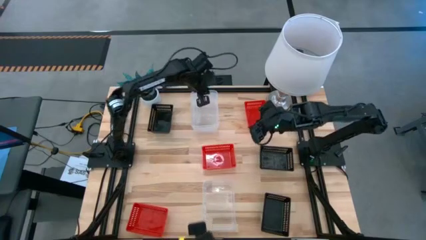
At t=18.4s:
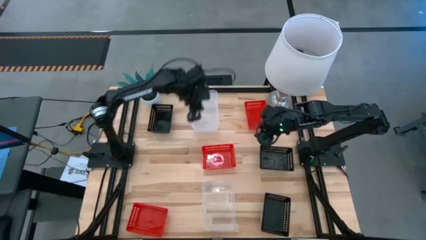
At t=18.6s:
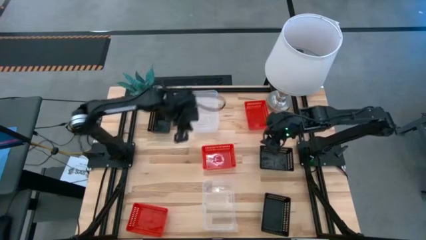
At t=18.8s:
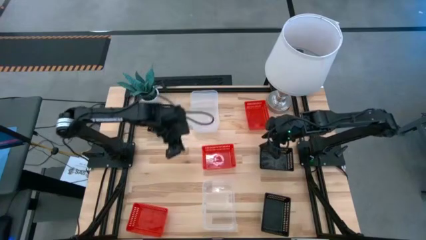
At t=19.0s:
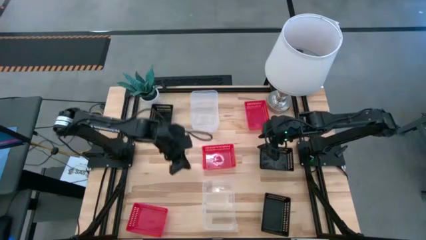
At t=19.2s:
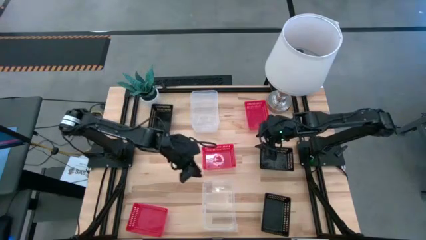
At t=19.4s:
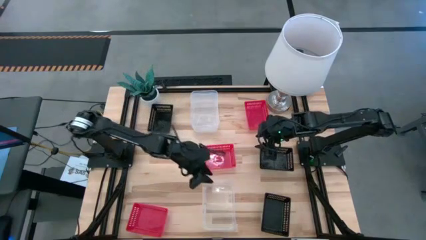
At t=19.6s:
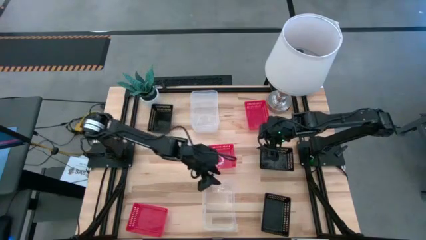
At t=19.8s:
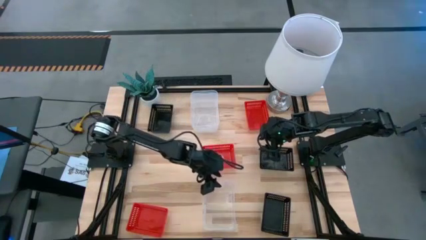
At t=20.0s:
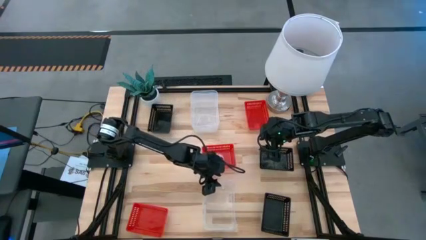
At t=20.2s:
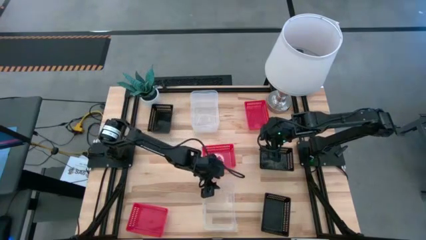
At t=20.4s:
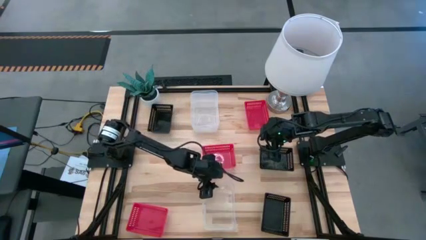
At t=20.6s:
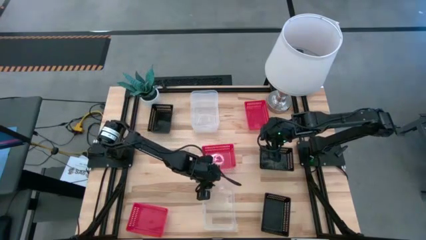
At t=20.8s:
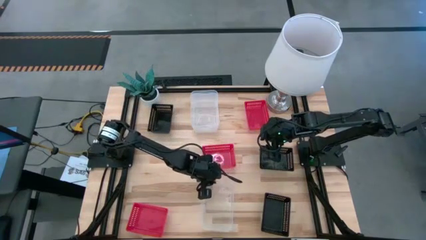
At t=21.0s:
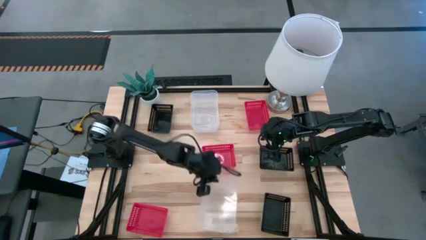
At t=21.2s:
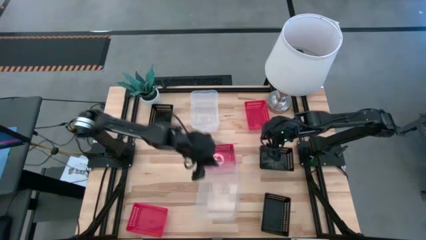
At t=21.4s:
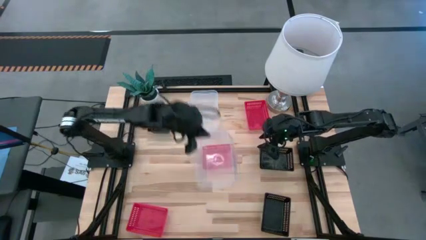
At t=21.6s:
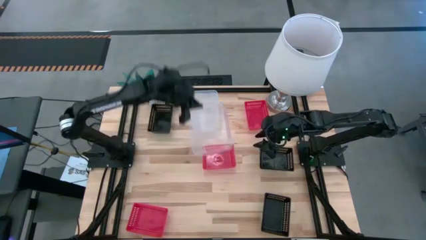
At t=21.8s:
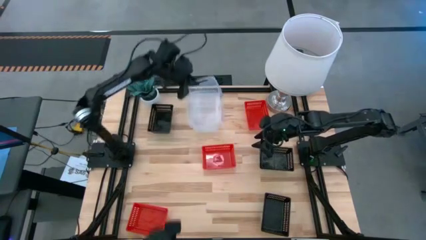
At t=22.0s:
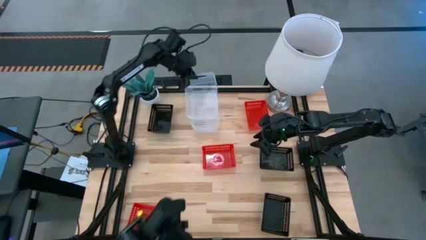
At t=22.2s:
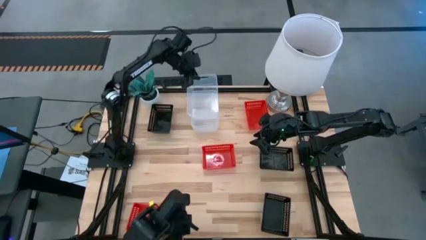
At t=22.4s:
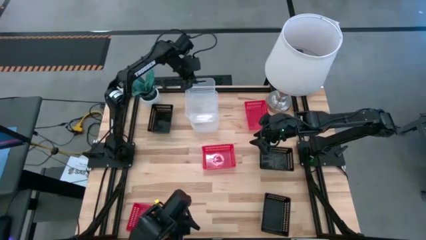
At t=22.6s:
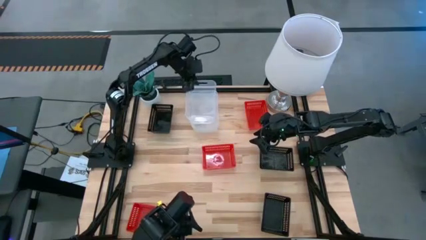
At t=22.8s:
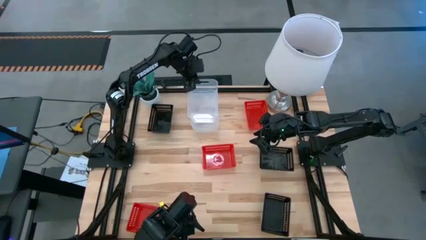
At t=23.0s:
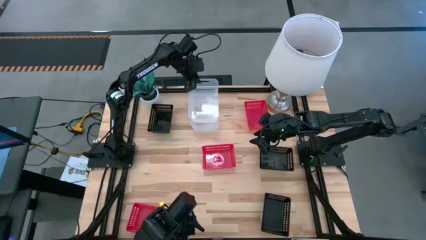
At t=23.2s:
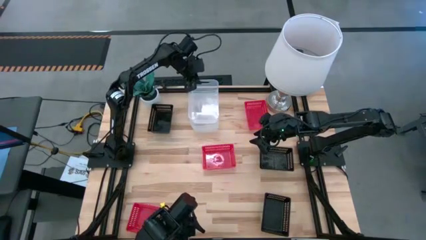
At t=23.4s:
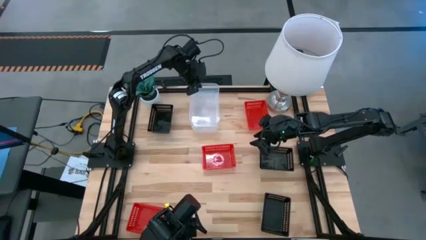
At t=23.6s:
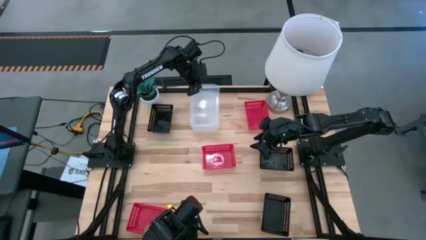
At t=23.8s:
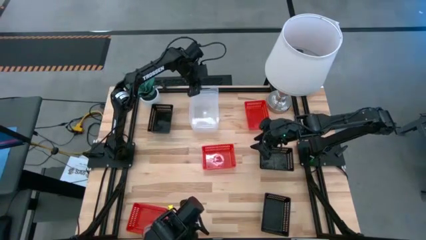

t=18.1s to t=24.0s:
Stack the transparent bin on the stacked transparent bins

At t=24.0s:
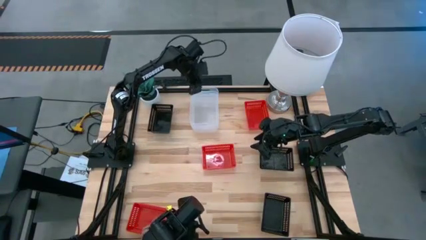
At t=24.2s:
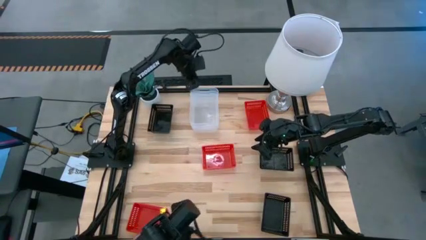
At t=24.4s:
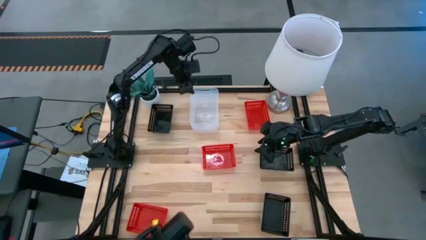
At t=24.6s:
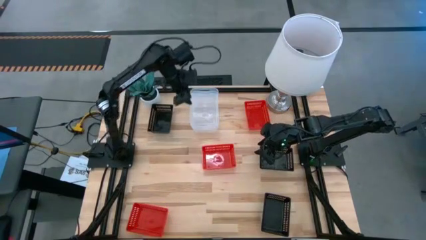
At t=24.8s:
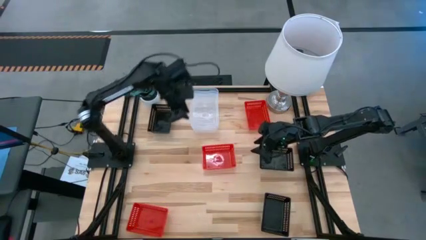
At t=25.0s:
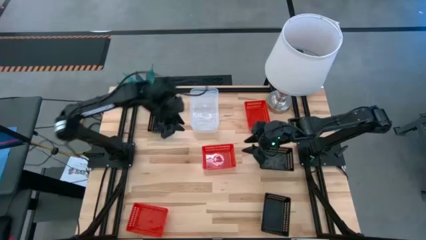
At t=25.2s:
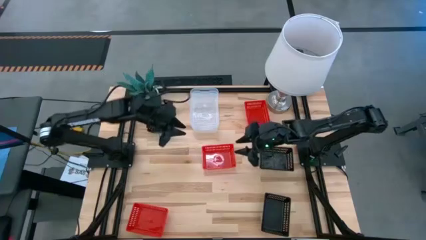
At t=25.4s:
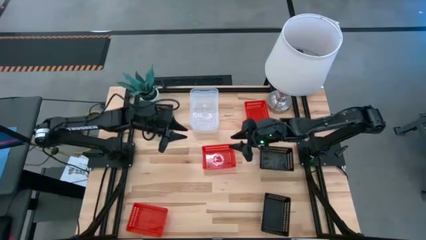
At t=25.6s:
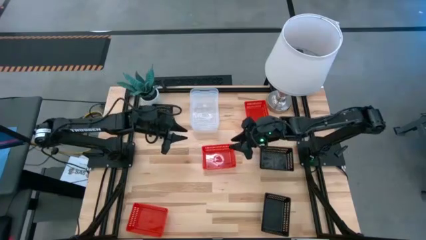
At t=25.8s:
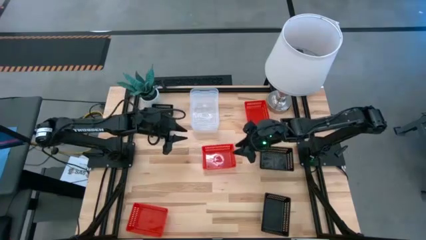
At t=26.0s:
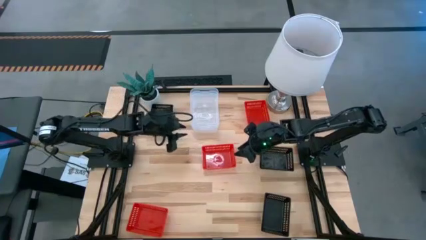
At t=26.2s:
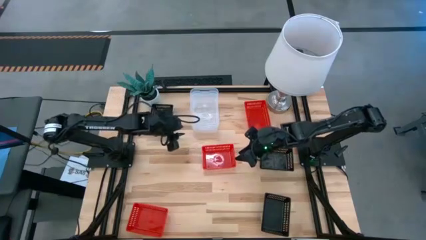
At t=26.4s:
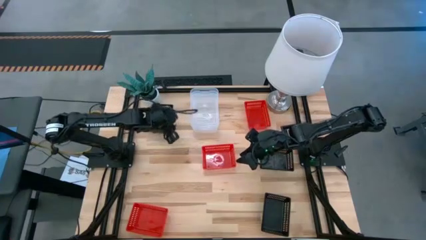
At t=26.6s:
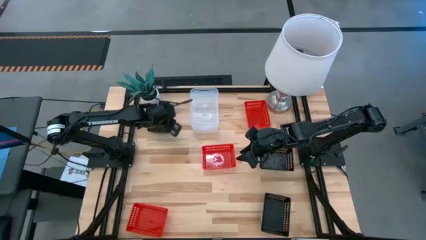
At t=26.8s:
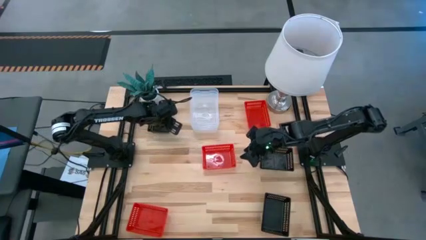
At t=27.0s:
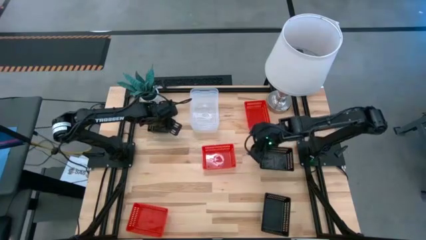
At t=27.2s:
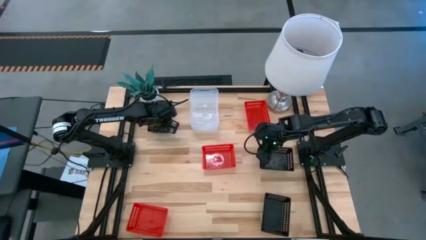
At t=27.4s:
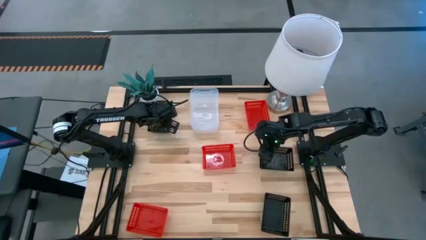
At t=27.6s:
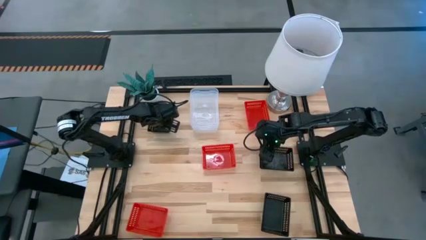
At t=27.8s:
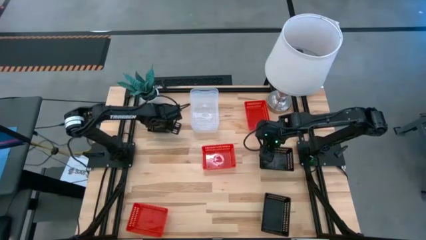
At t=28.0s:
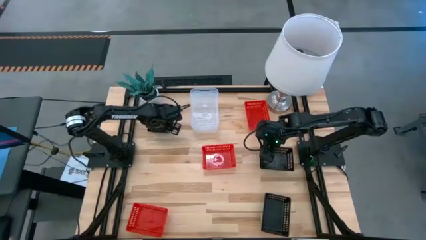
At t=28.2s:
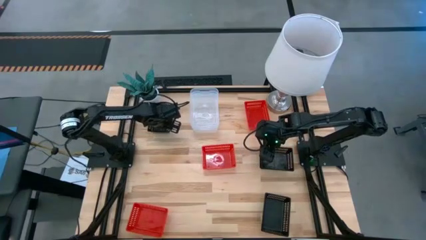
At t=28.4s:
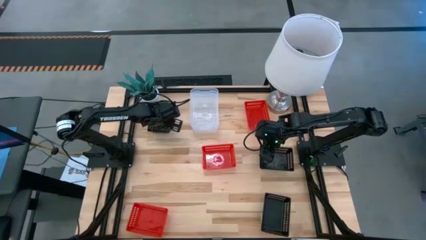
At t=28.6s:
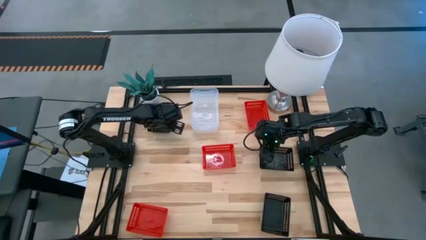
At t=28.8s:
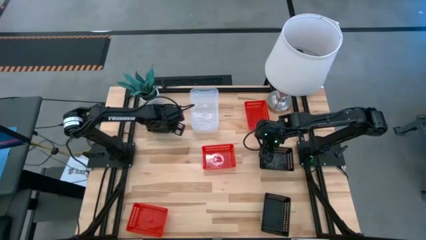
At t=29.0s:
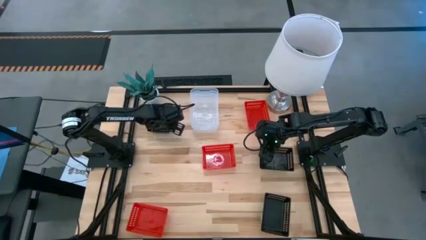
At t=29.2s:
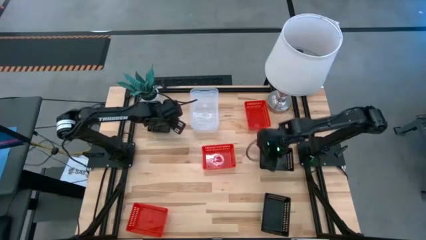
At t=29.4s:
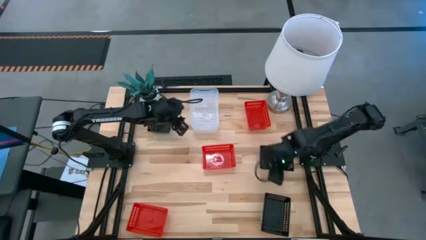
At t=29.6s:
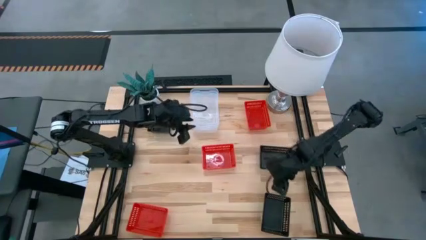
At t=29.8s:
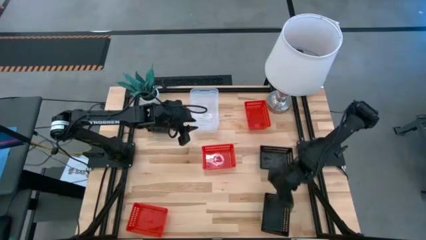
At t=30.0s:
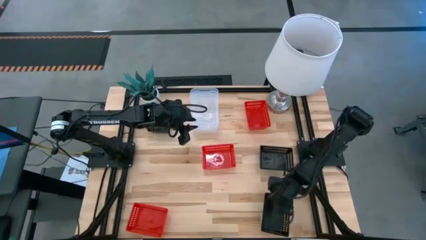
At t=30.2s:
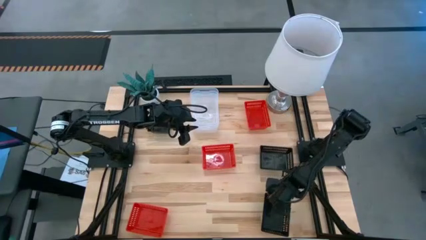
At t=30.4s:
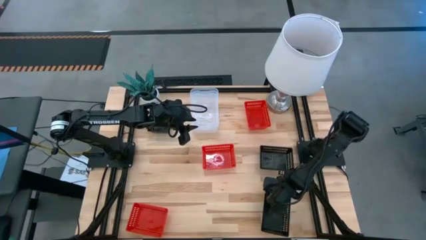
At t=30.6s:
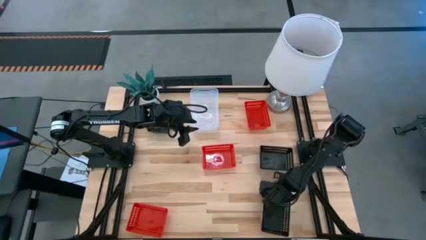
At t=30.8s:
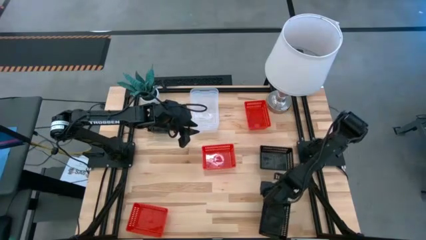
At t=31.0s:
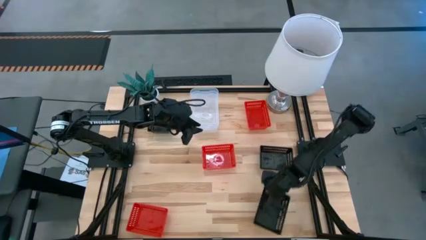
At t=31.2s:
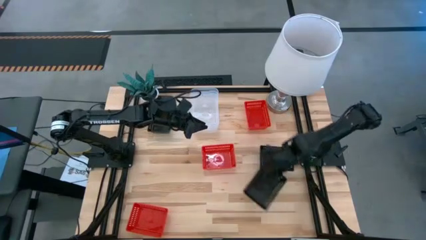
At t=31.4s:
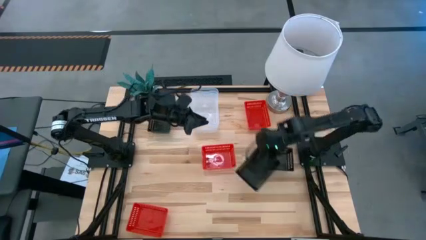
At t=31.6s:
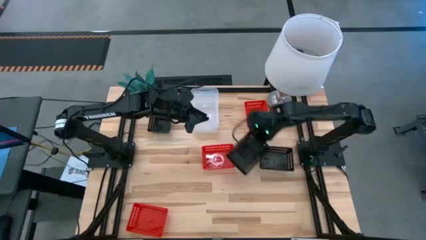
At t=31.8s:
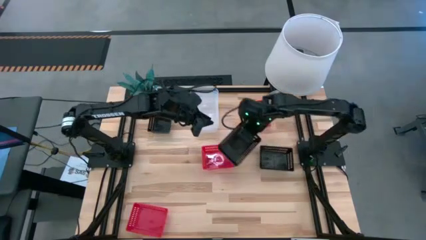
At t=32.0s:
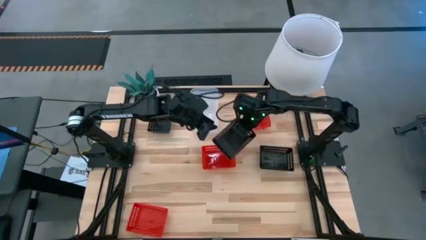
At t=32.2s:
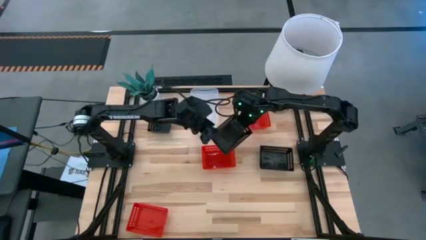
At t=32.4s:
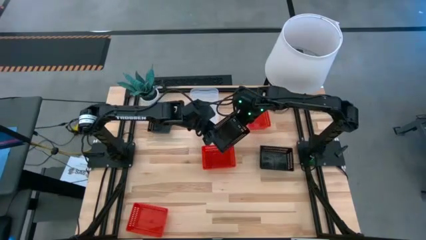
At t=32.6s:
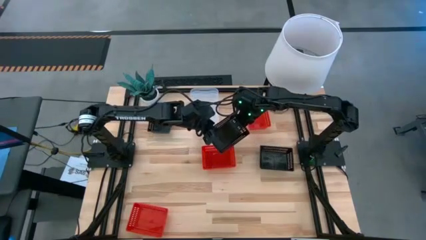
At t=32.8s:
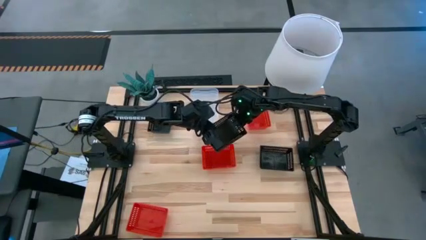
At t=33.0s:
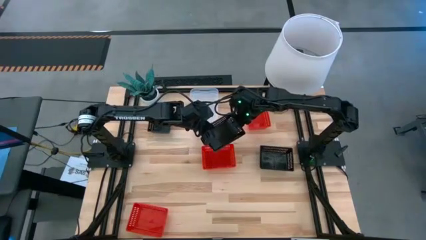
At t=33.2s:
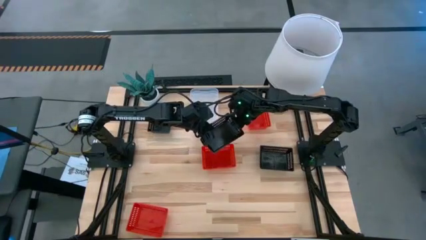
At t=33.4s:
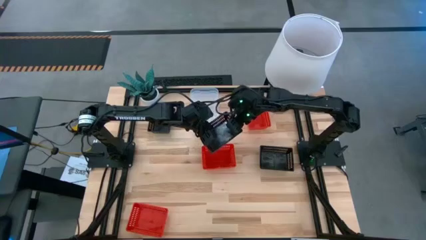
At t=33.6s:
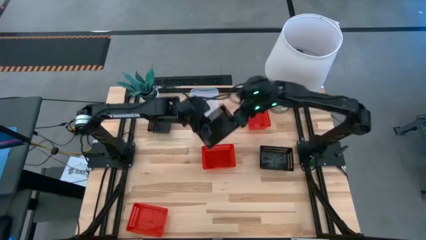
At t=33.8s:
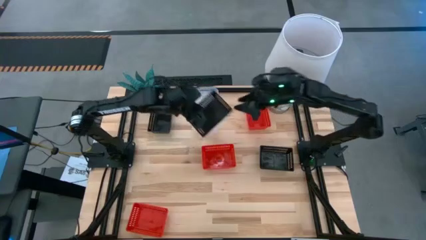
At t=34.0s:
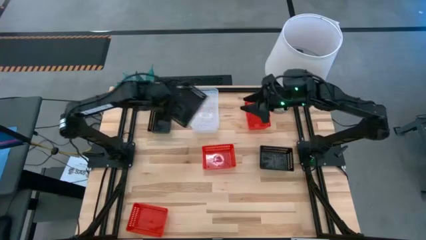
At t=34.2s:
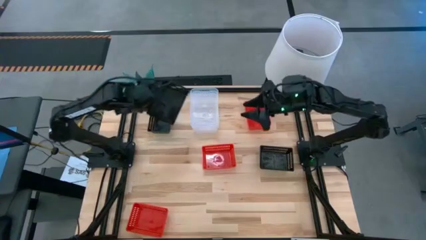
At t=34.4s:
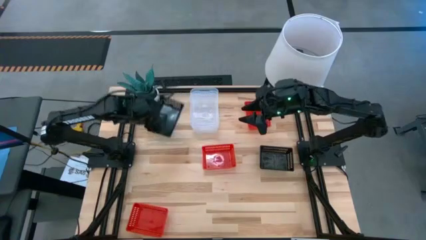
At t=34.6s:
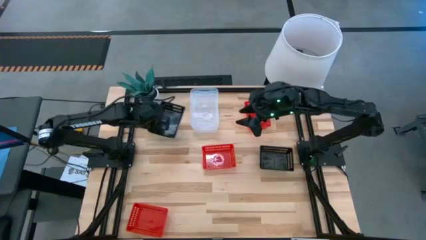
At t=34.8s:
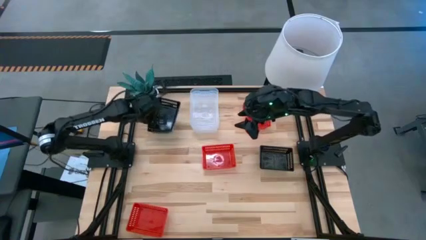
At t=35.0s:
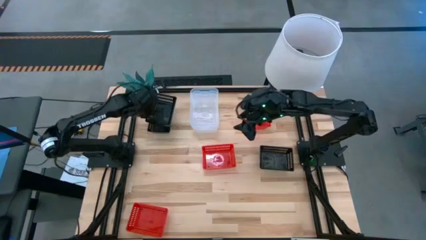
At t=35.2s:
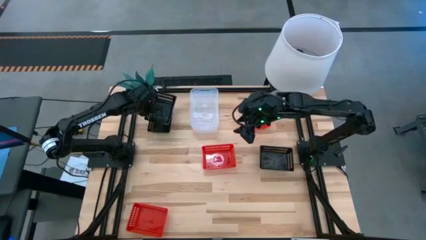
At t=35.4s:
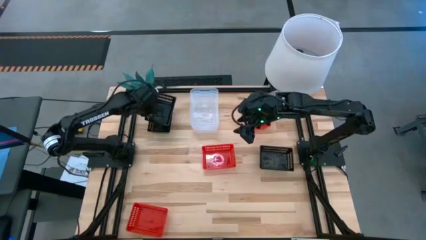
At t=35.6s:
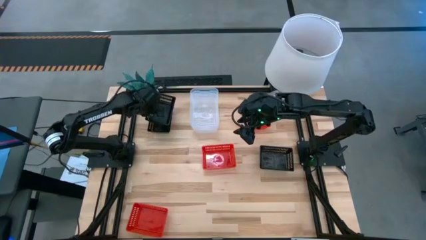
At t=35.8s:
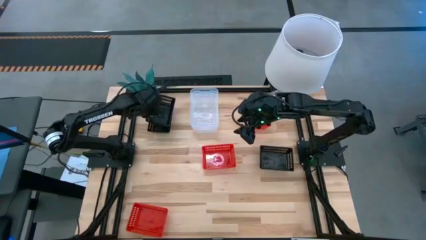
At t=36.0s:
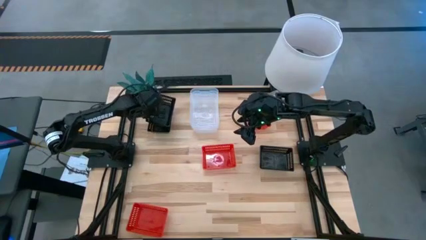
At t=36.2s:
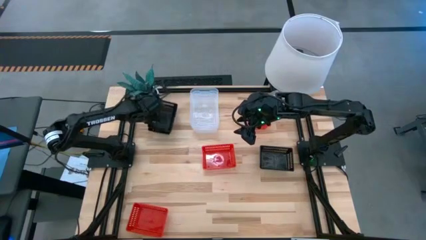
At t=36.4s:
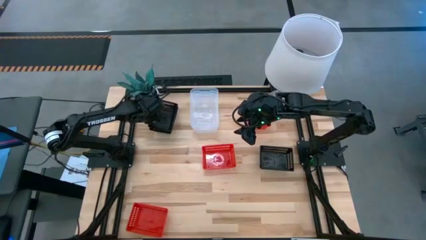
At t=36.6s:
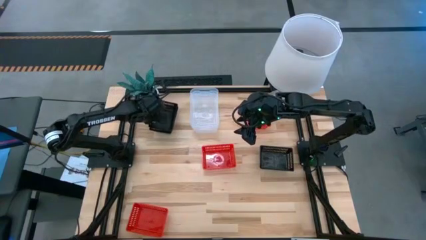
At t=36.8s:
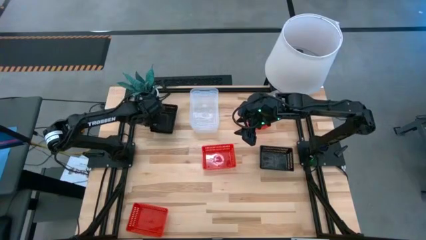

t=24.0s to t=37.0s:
Stack the bottom right black bin on the top black bin
